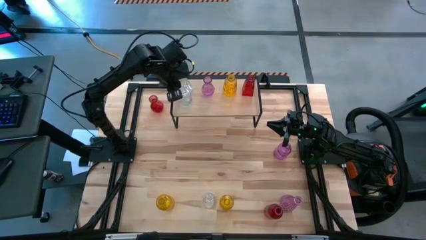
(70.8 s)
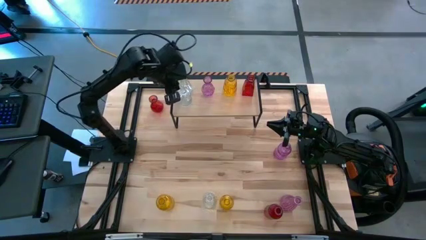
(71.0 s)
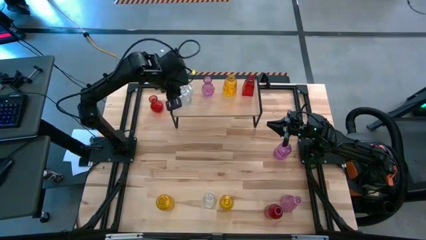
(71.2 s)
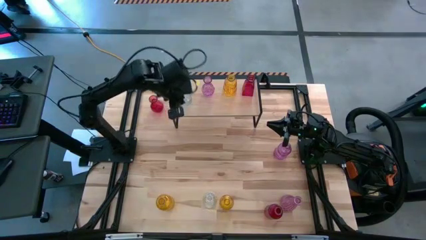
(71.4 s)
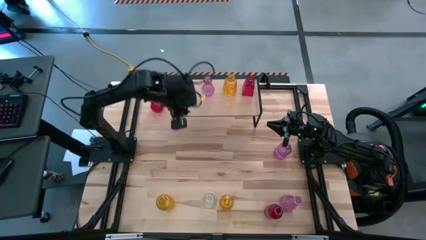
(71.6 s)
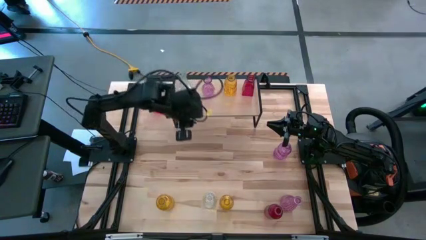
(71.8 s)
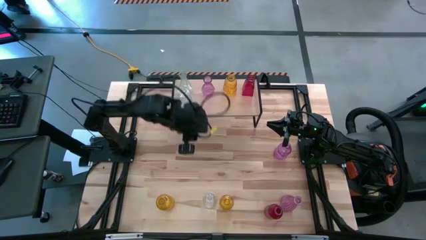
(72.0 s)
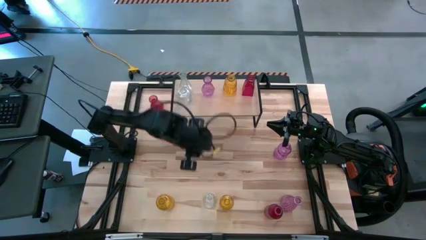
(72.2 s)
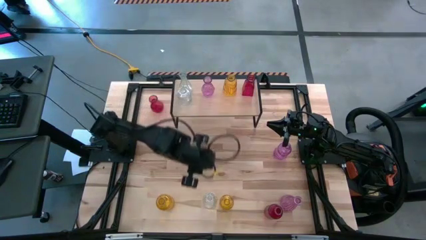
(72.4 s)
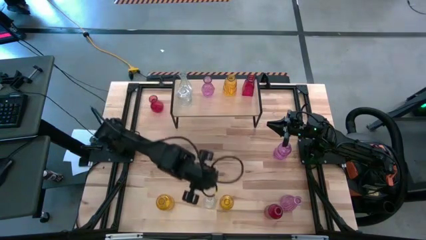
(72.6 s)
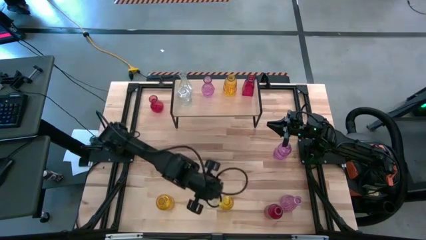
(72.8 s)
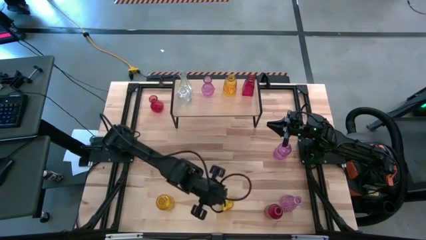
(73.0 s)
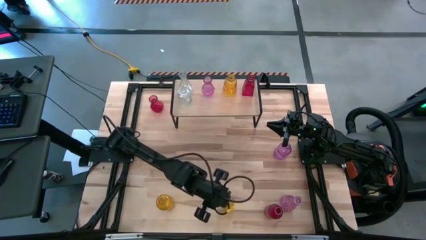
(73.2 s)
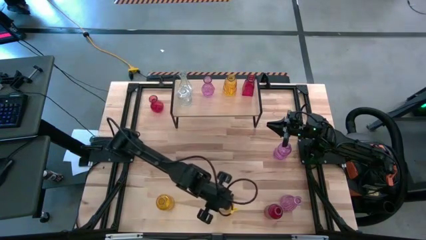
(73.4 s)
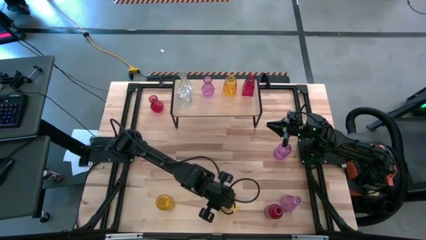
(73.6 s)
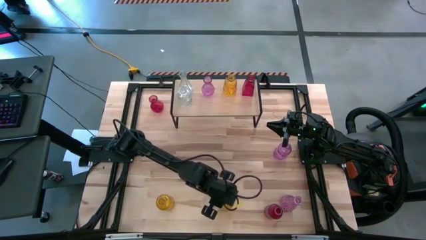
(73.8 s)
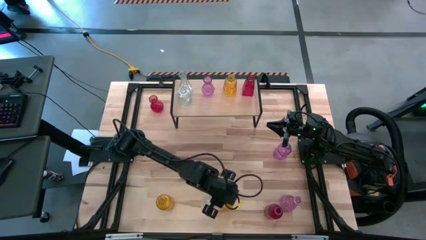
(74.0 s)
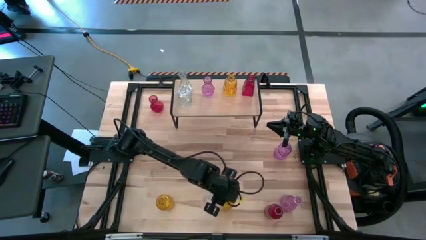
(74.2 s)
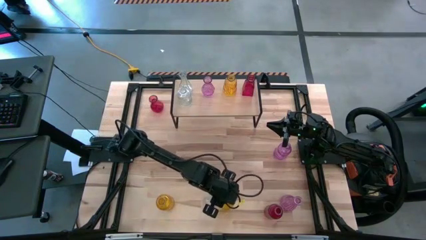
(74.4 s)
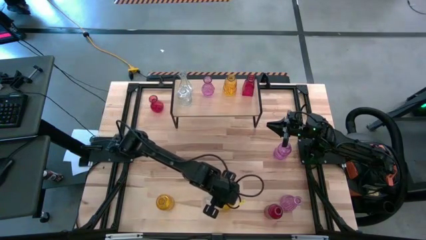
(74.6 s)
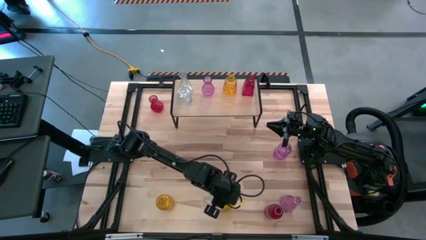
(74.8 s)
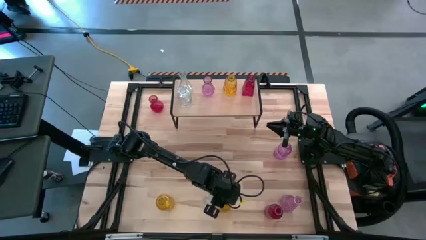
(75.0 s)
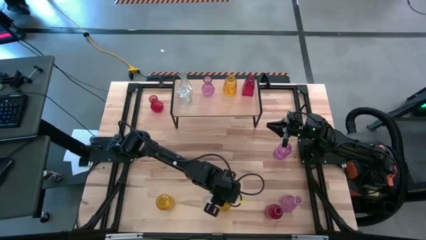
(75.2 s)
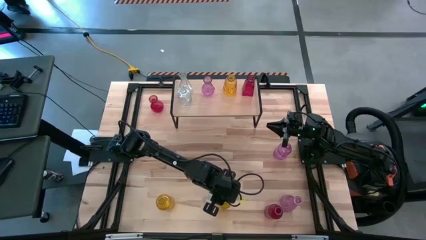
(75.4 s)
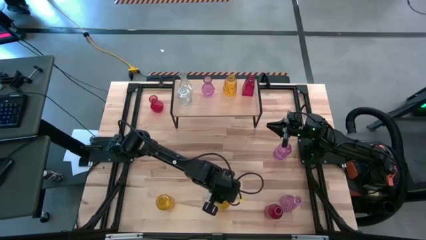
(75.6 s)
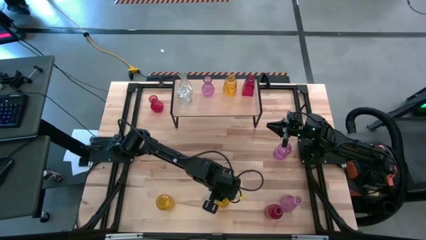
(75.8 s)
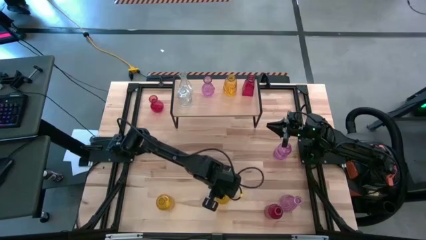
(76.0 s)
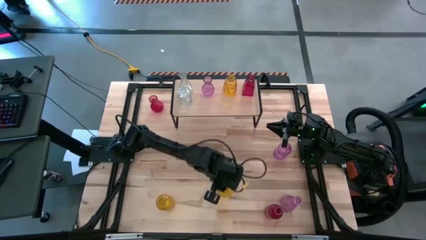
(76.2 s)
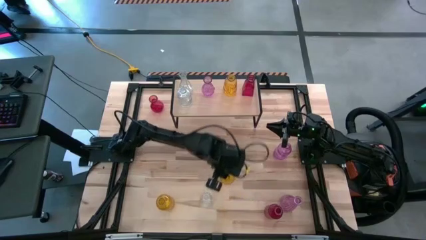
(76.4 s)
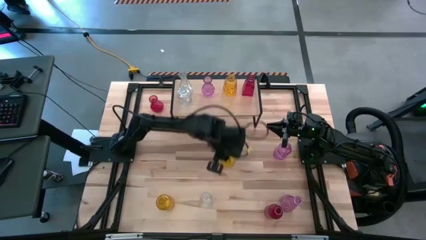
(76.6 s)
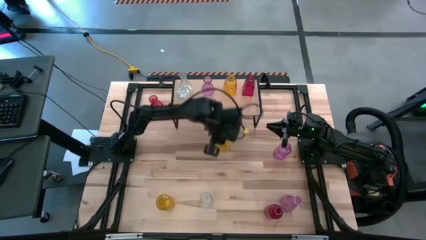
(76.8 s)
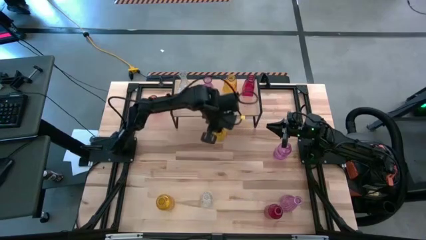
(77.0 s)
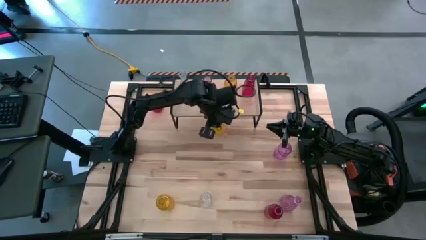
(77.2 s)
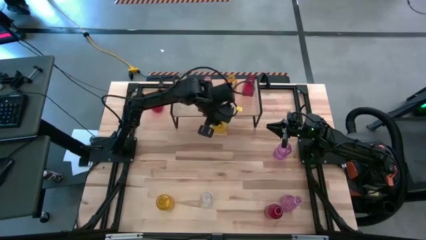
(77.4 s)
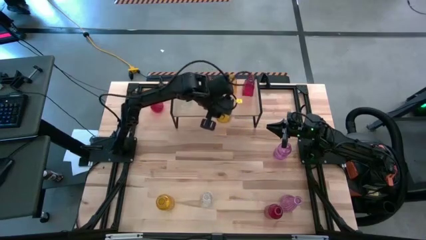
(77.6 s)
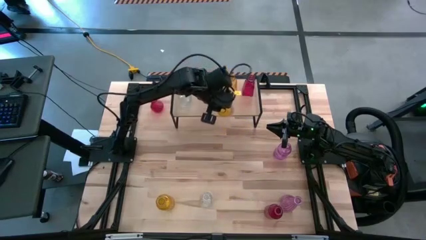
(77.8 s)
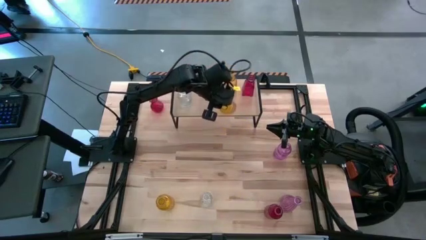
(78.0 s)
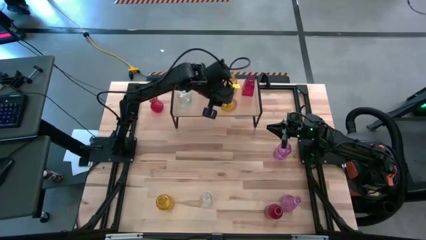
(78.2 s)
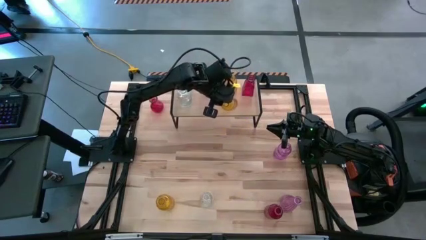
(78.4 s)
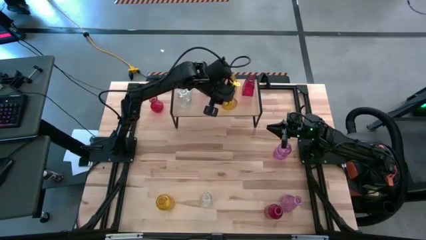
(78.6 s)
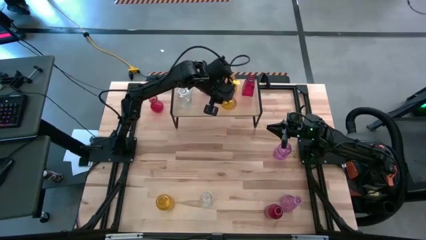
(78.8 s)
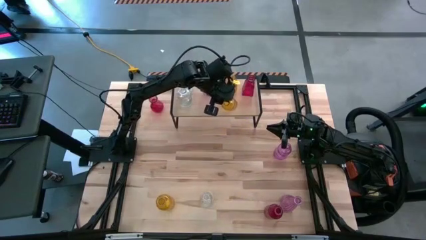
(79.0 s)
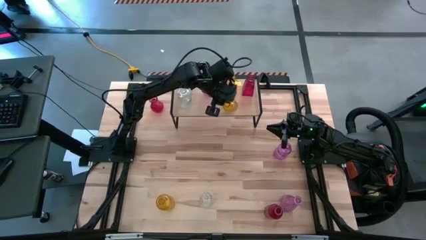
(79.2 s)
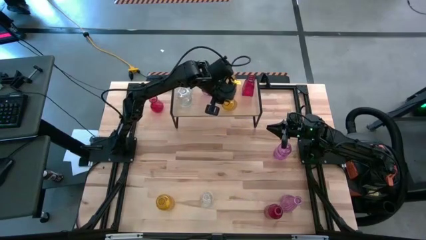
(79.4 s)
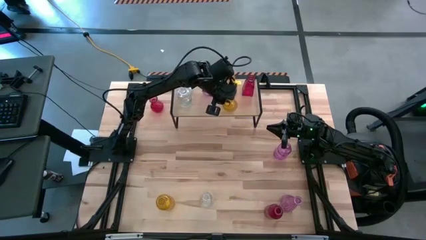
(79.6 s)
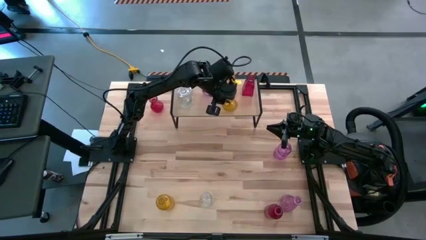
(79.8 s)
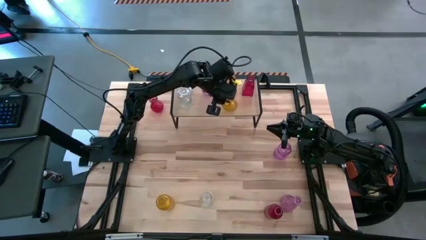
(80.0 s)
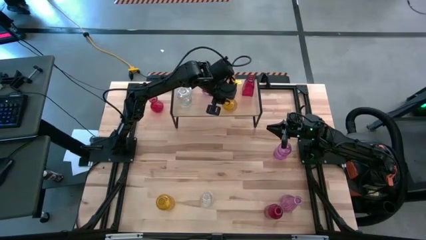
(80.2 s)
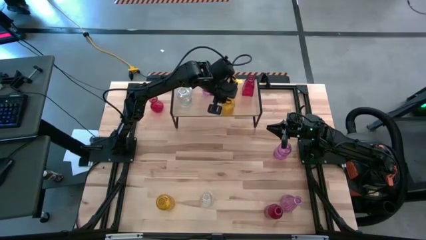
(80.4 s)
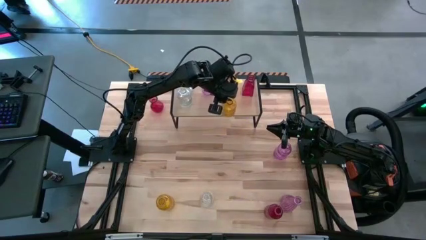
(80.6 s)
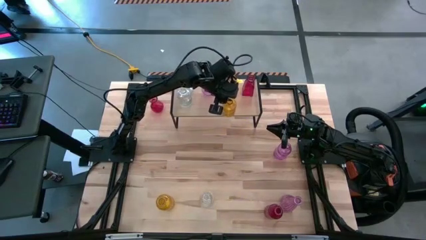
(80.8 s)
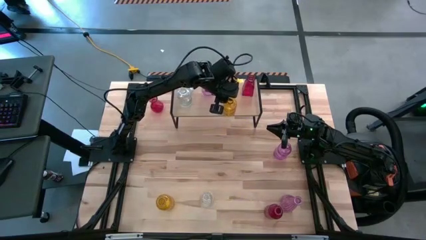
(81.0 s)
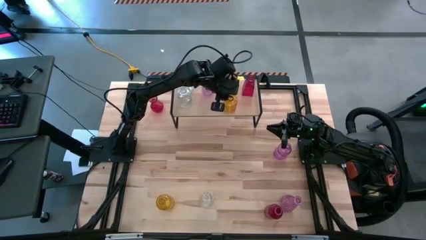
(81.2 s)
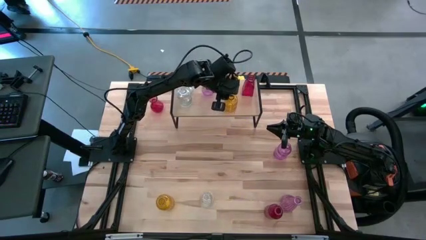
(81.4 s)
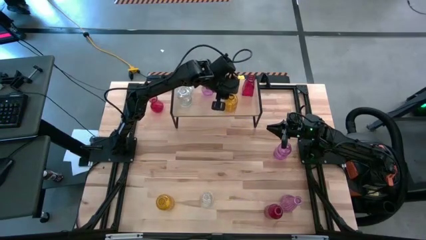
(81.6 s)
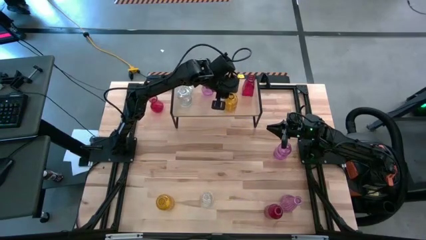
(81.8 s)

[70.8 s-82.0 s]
Task: sort vases onto shelf
Put the right yellow vase on the shelf aligned with the other yellow vase

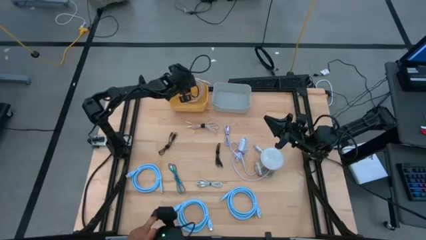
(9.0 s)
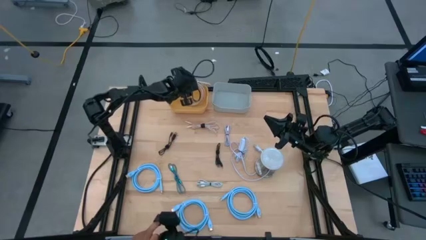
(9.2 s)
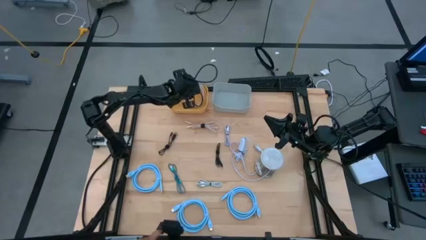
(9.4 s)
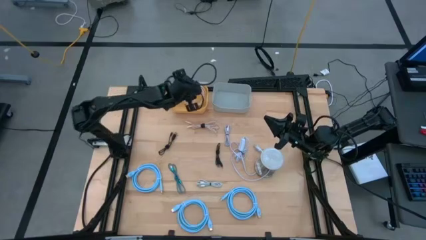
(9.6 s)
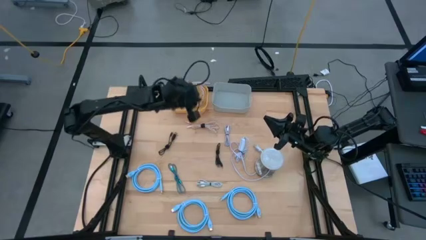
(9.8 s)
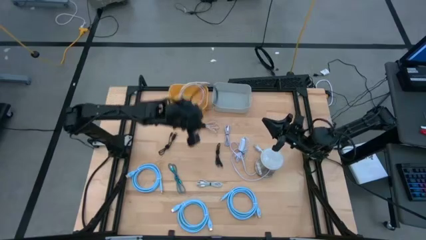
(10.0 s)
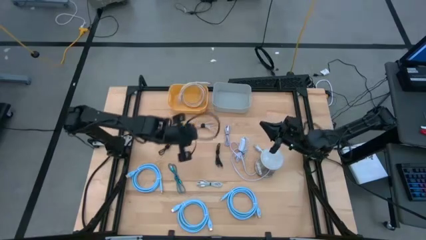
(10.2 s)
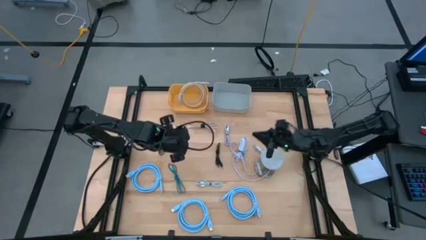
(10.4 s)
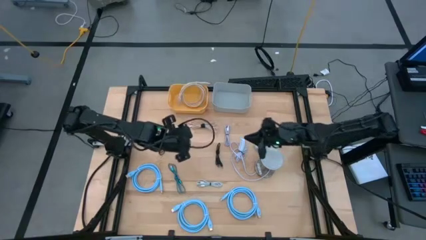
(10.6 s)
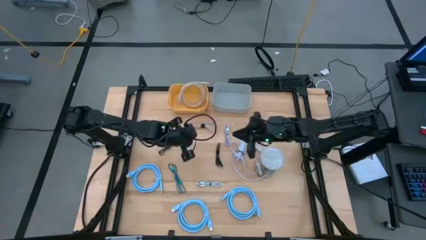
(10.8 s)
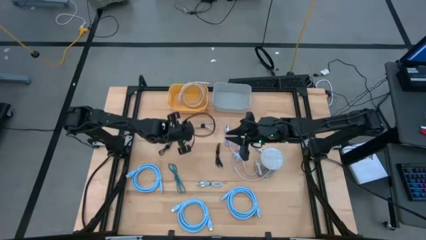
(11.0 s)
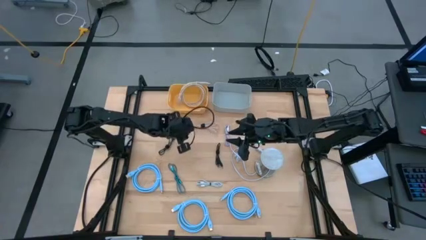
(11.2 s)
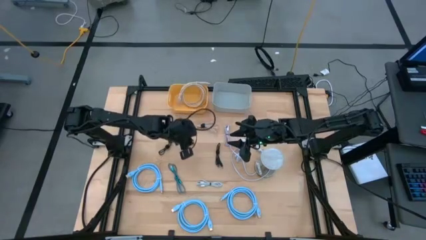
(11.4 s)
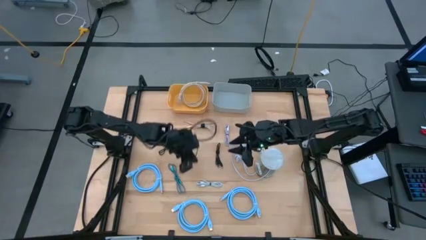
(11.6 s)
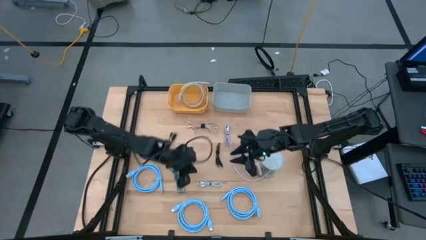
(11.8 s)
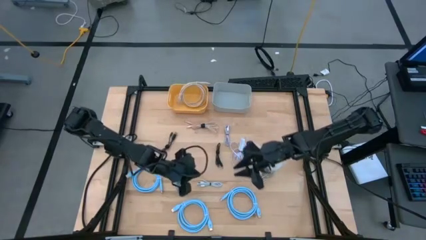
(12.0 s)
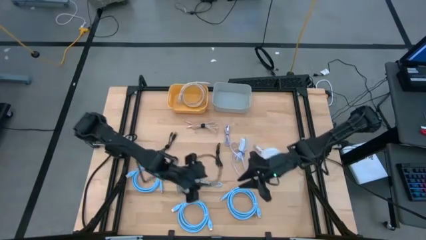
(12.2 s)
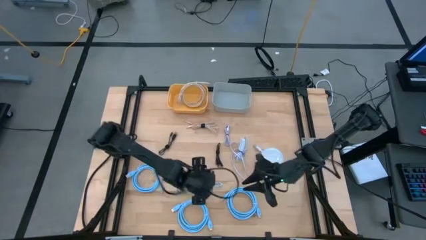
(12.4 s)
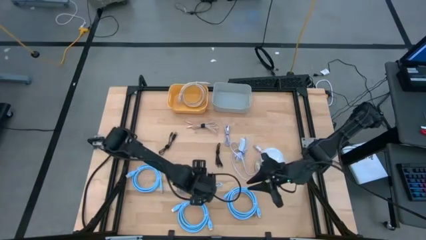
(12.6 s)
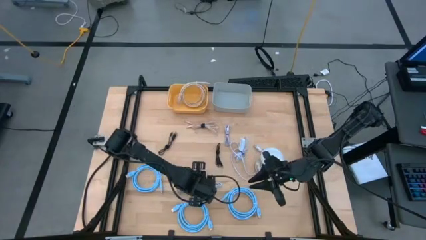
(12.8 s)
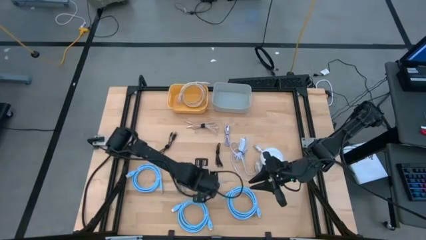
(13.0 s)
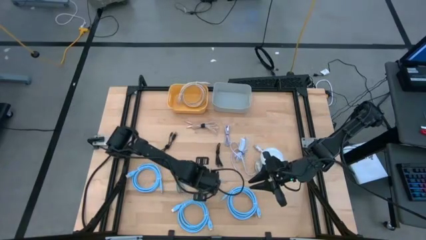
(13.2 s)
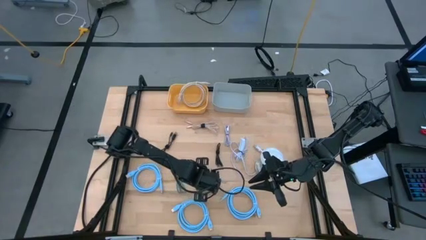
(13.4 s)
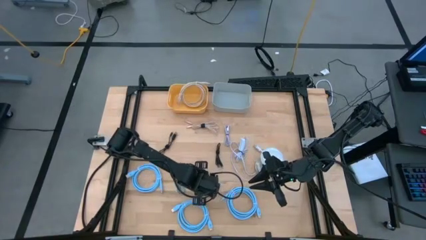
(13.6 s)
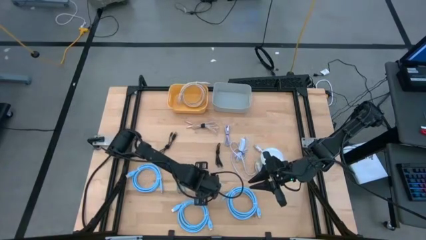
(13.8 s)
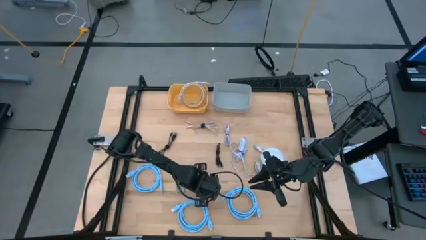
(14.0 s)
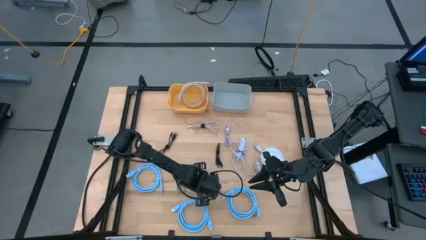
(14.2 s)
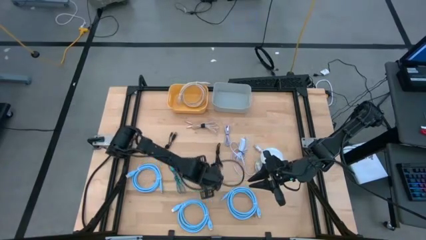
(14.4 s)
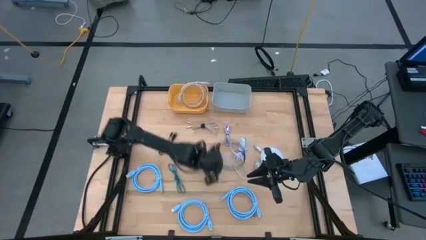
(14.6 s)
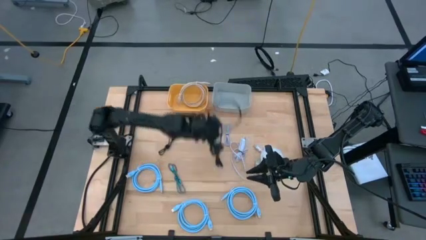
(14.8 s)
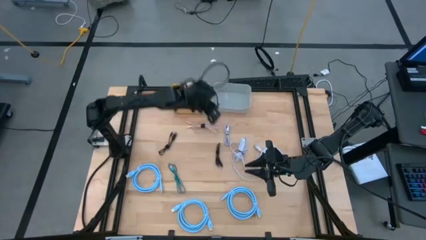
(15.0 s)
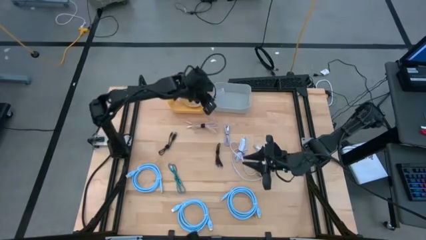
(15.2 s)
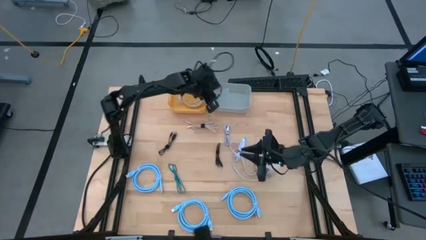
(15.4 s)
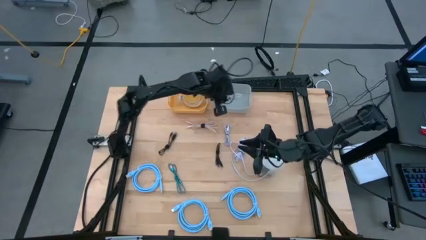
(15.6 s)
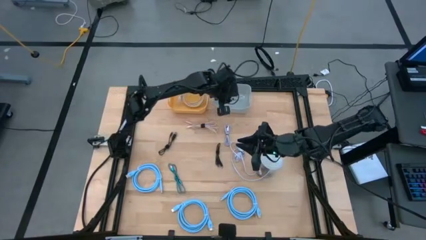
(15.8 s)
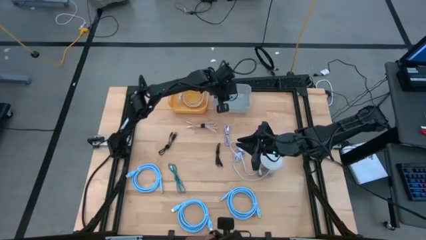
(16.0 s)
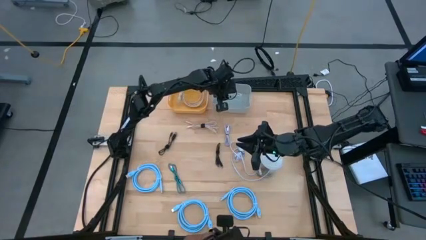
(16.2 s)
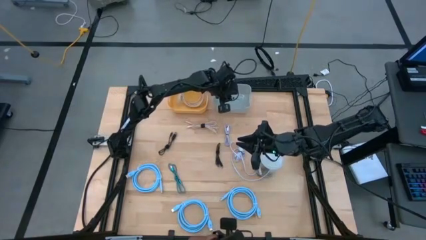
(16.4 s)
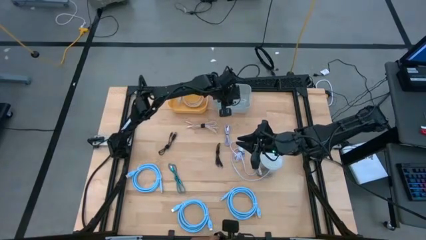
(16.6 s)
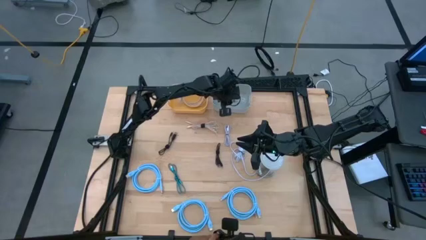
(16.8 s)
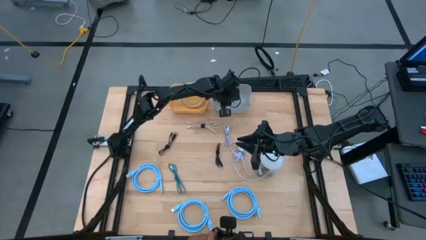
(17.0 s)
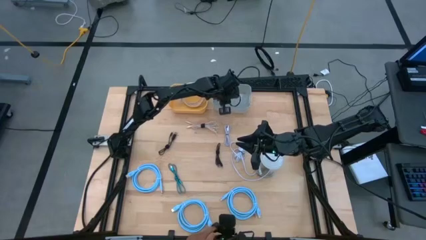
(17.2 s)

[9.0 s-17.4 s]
Task: Pick & Place USB Port
Put the gray charger cable into the gray bin
